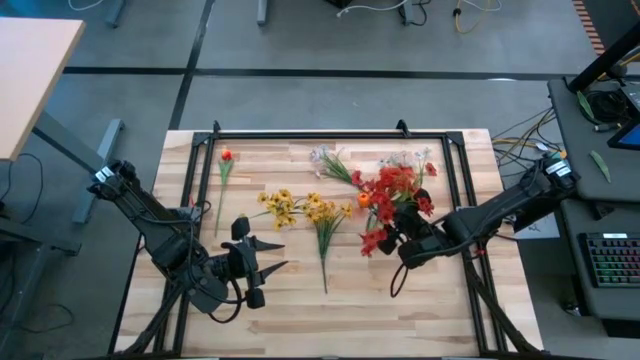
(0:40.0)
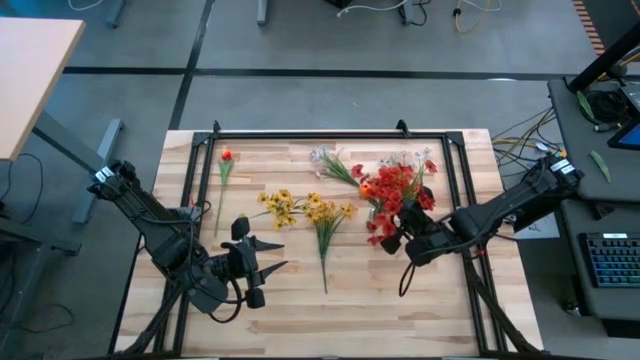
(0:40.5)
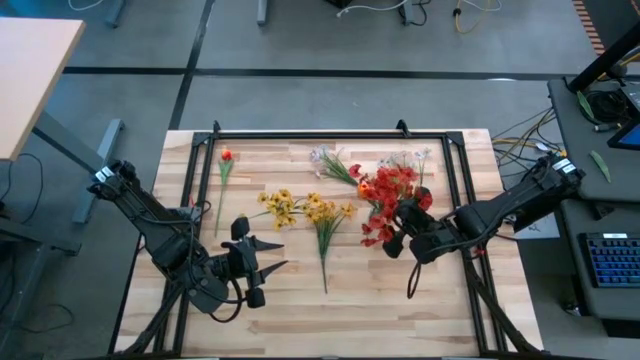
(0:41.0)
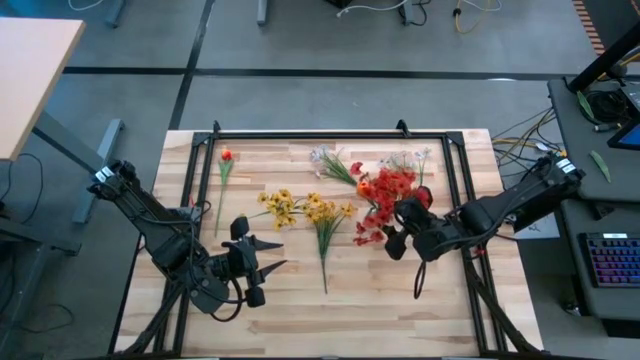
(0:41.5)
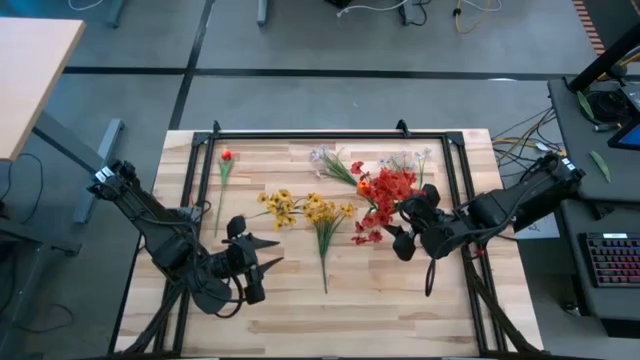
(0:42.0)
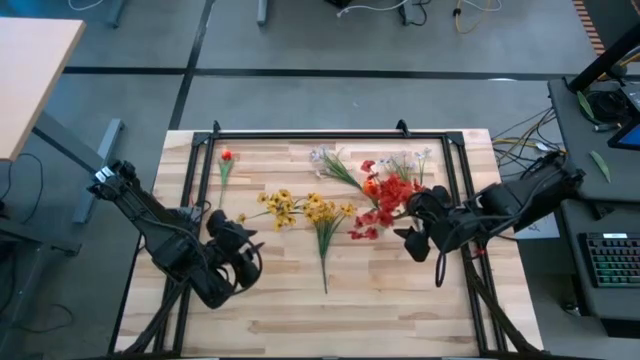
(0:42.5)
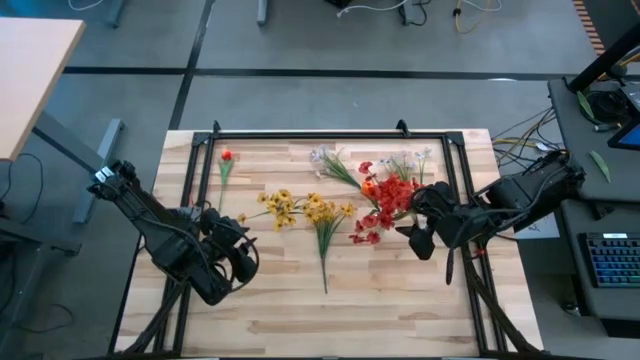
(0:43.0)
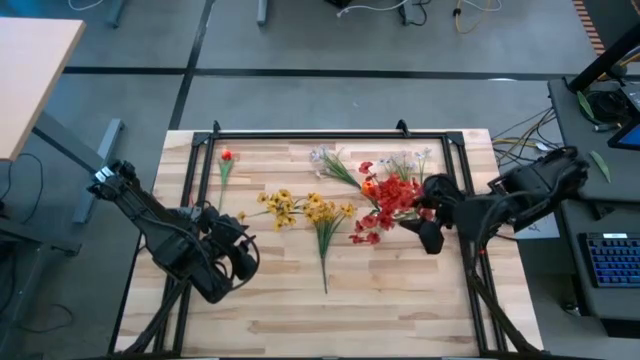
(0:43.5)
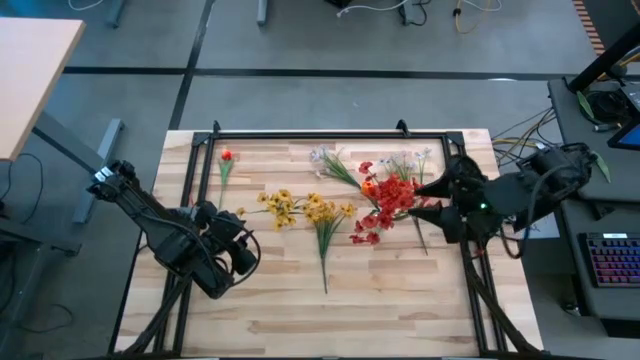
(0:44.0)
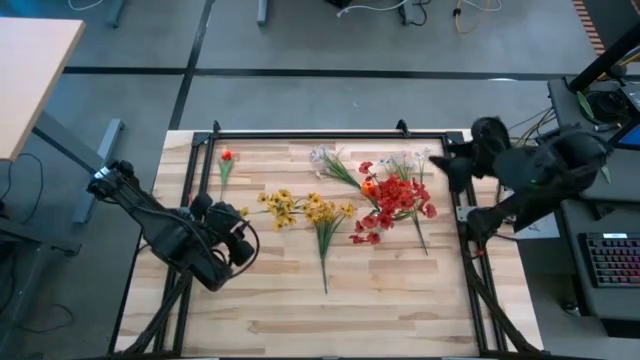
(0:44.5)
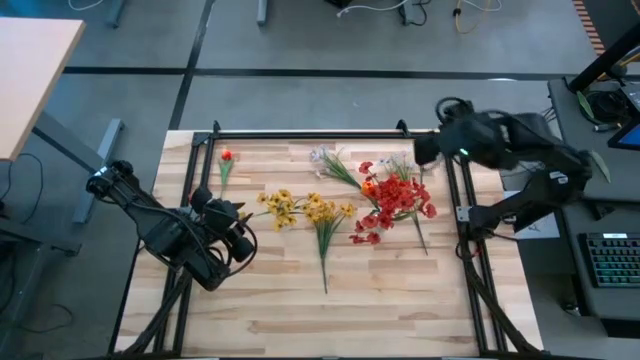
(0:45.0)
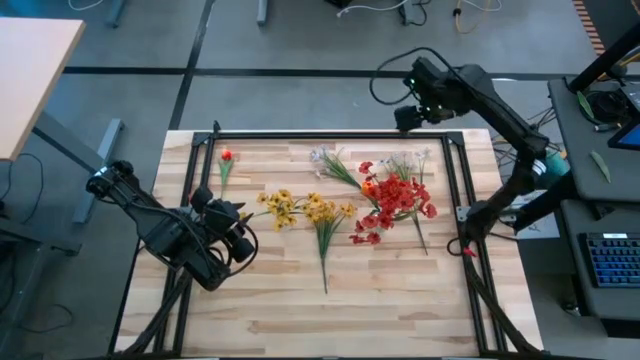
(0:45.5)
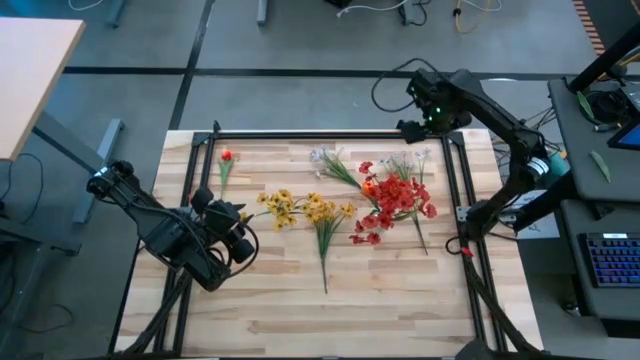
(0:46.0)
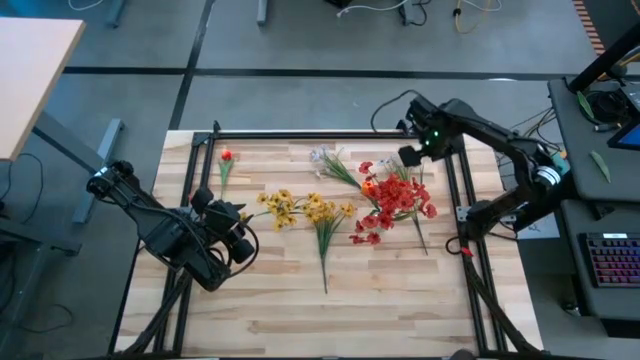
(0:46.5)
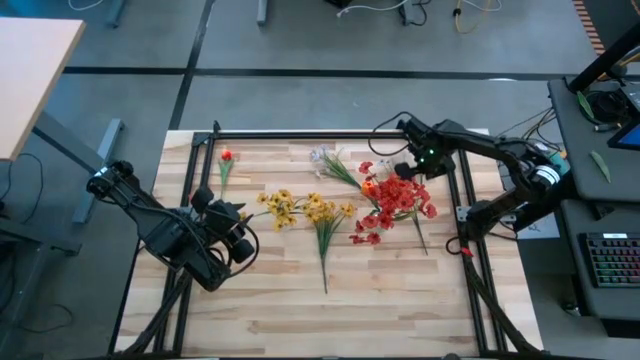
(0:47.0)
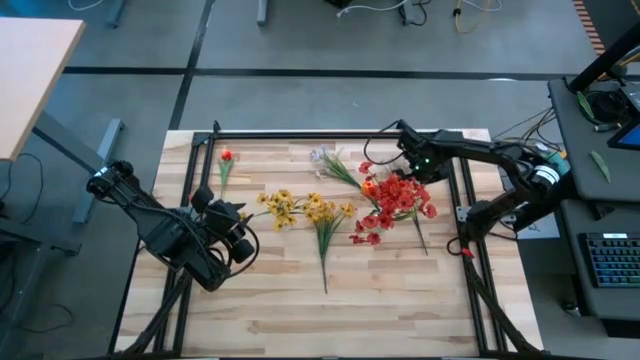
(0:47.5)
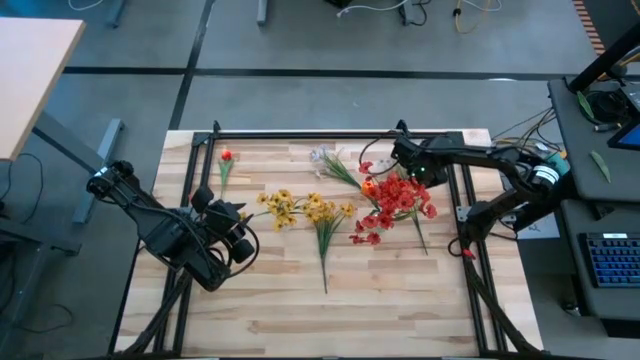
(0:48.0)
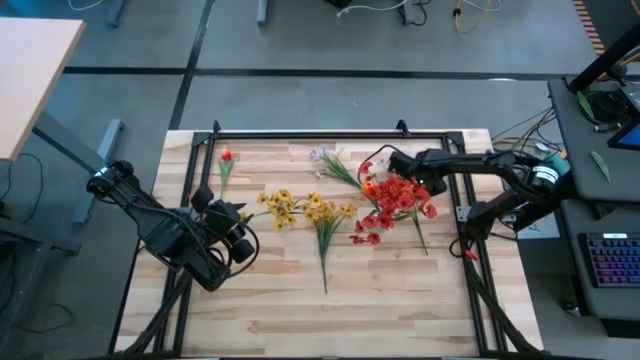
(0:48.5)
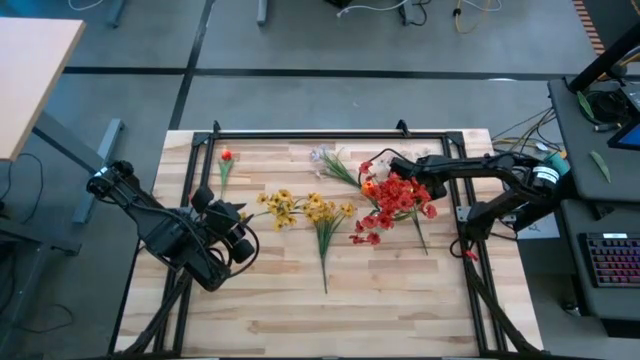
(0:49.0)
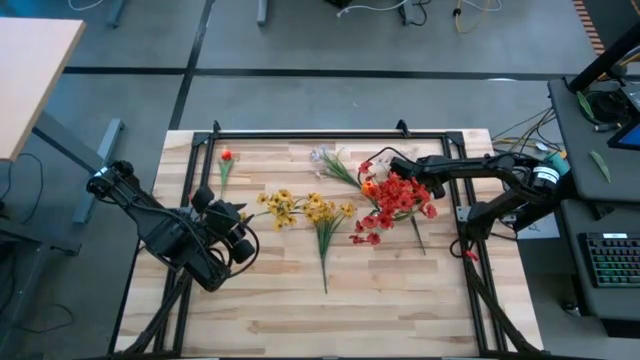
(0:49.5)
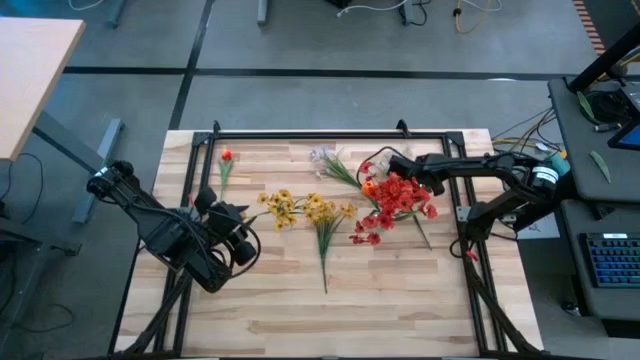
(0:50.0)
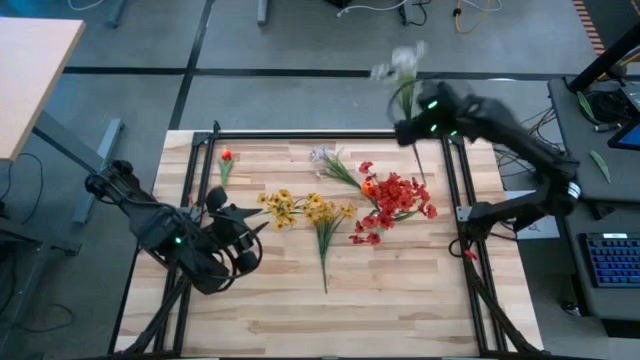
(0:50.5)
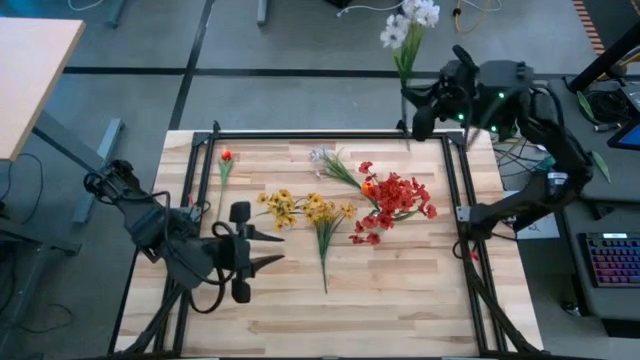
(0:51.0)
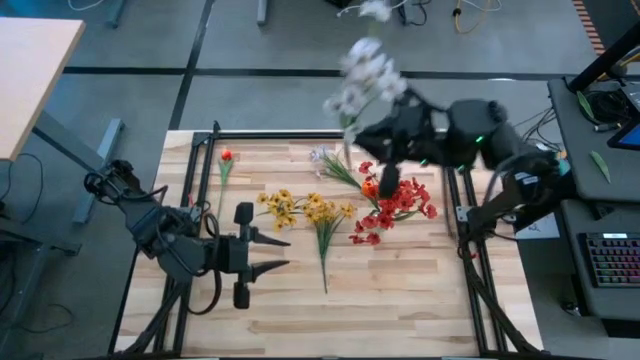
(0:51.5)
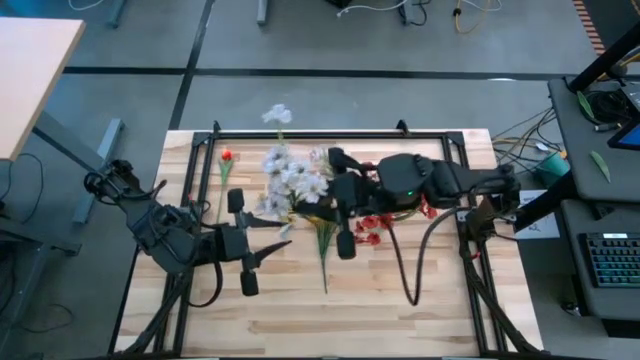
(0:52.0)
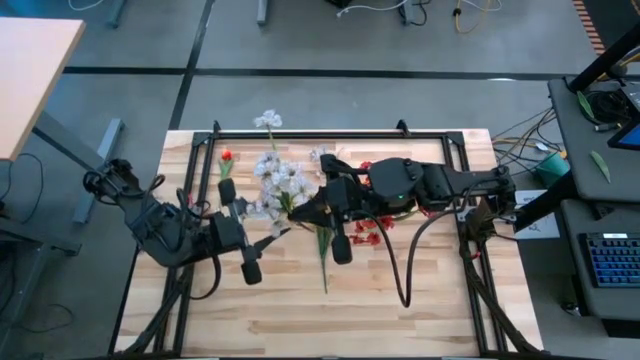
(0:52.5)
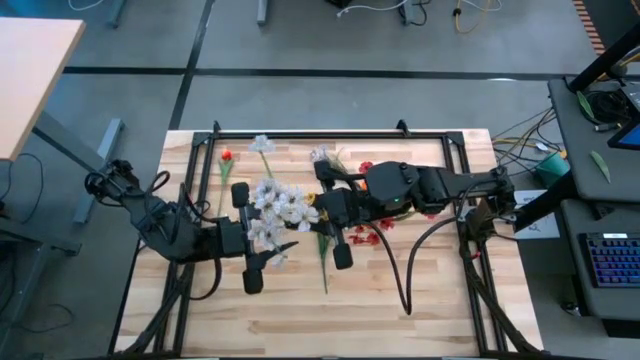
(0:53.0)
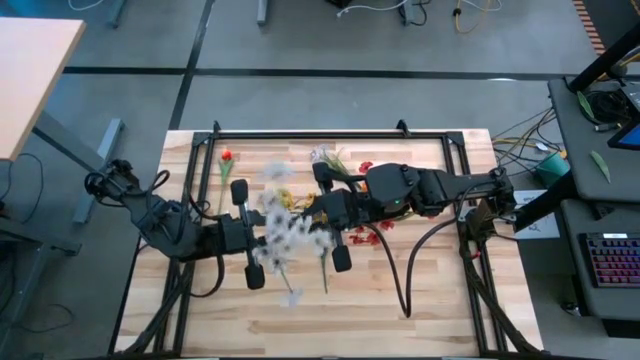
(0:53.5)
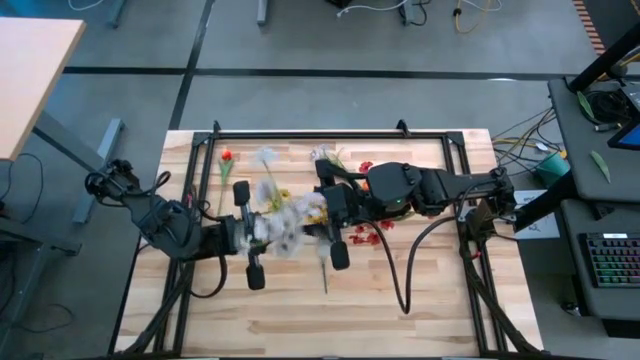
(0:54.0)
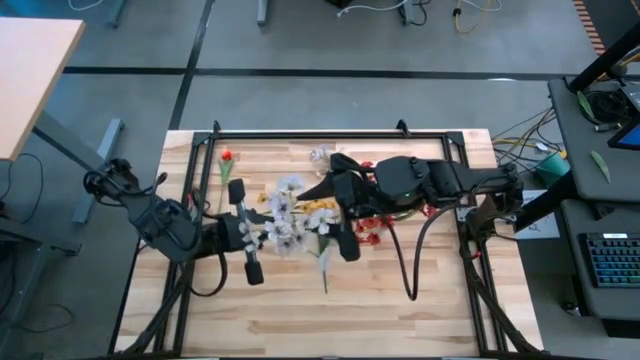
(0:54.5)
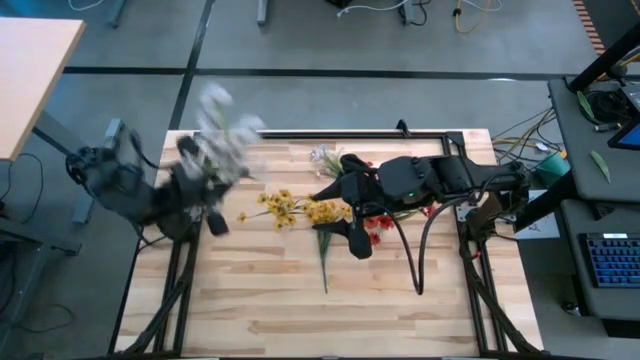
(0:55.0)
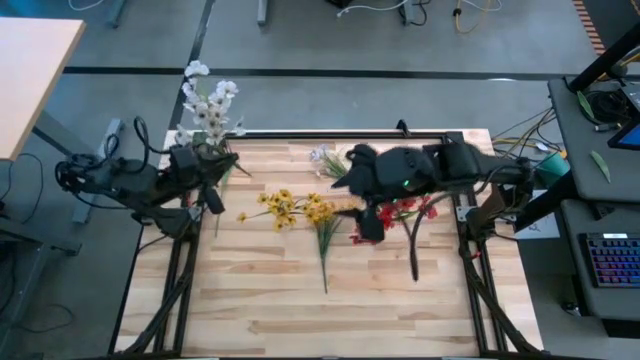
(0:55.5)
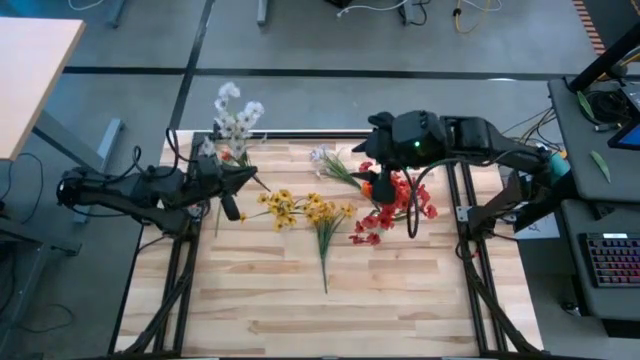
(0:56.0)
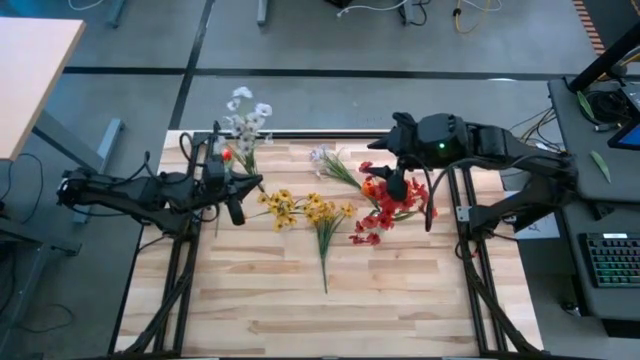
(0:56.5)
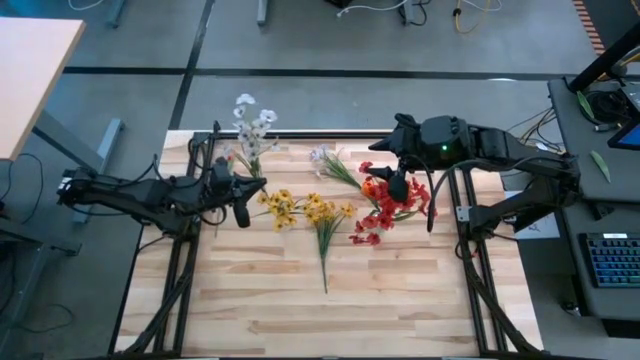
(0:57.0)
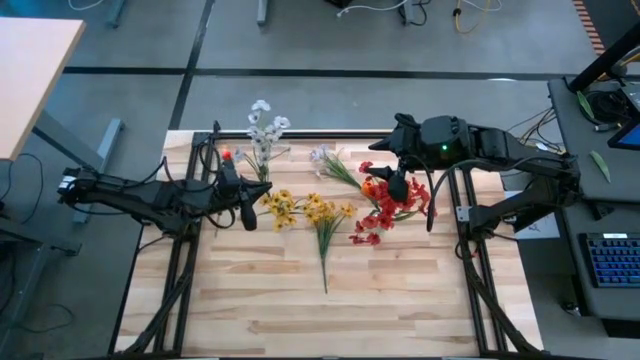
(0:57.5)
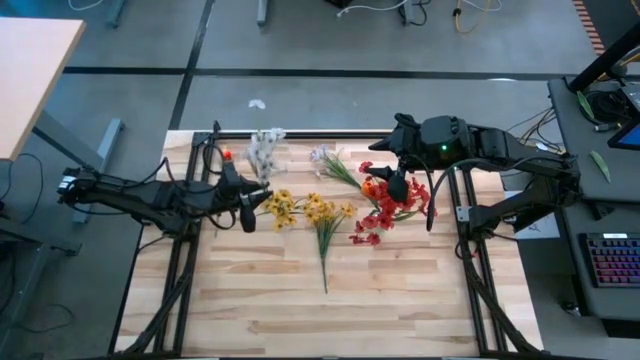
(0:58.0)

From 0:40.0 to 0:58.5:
Task: Sort flowers into vase by color
Put the right white flower into the left transparent vase
